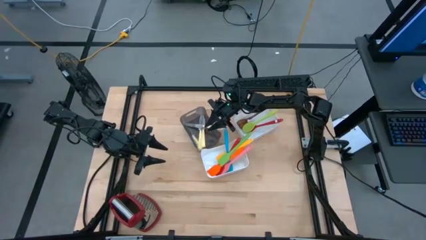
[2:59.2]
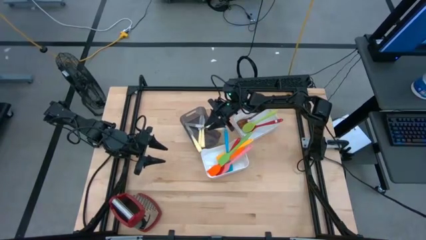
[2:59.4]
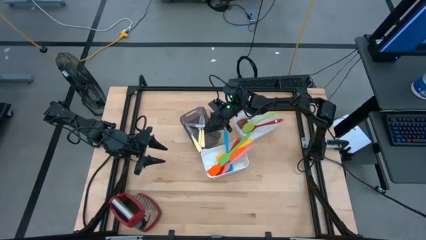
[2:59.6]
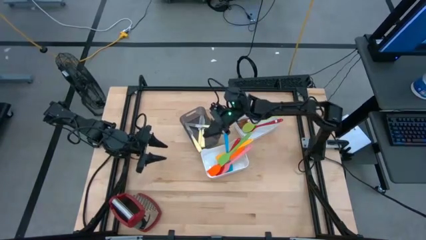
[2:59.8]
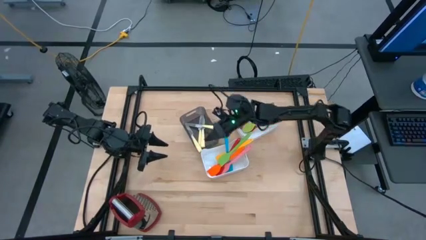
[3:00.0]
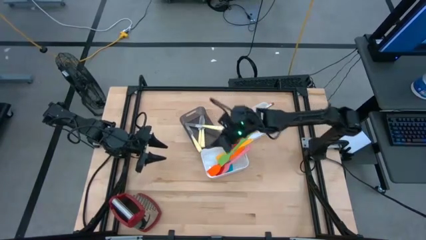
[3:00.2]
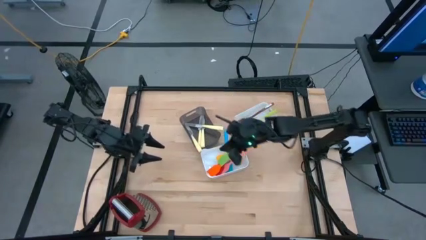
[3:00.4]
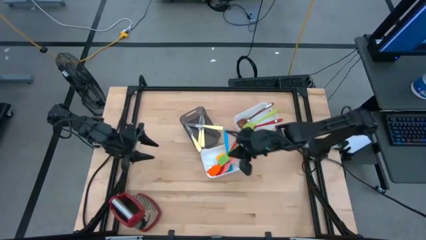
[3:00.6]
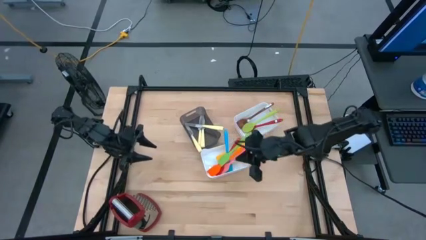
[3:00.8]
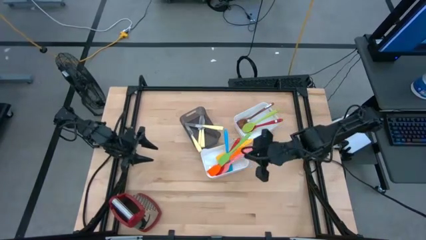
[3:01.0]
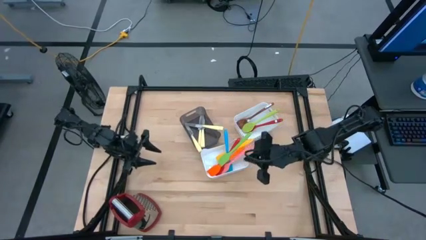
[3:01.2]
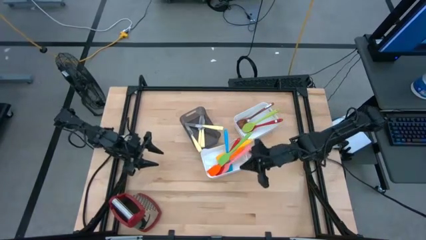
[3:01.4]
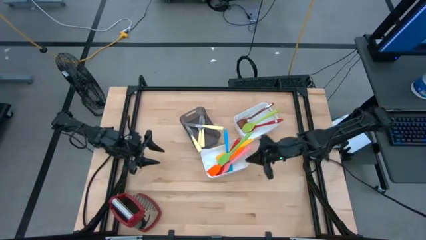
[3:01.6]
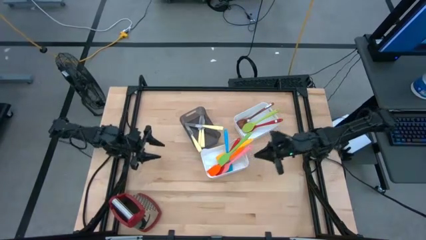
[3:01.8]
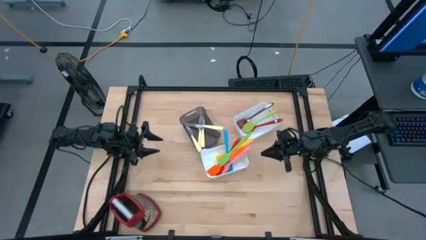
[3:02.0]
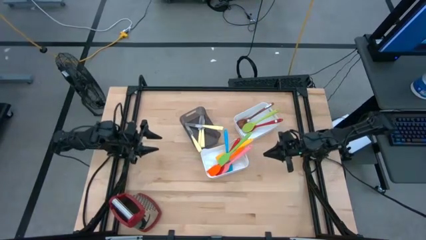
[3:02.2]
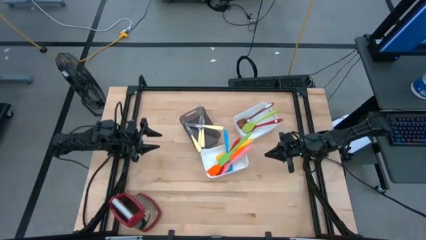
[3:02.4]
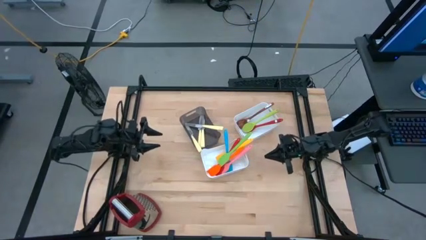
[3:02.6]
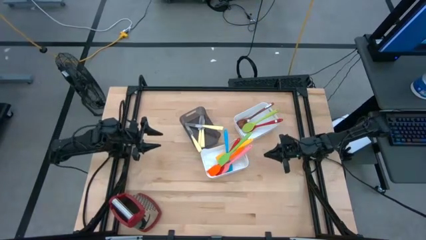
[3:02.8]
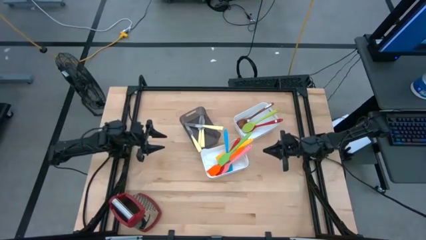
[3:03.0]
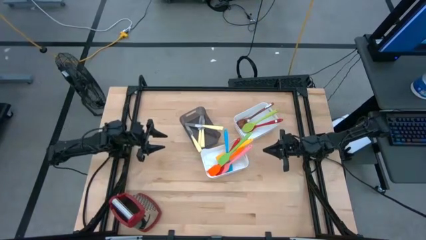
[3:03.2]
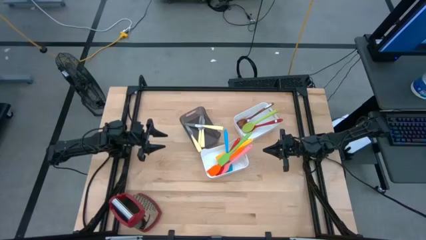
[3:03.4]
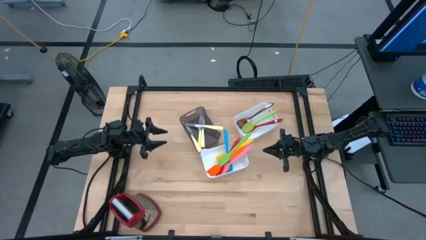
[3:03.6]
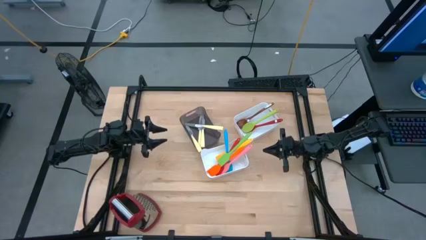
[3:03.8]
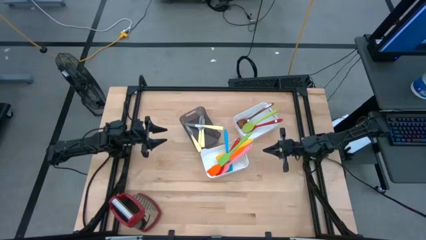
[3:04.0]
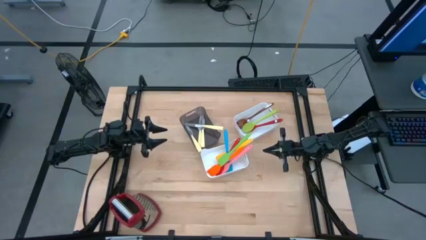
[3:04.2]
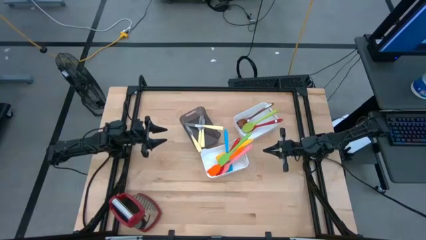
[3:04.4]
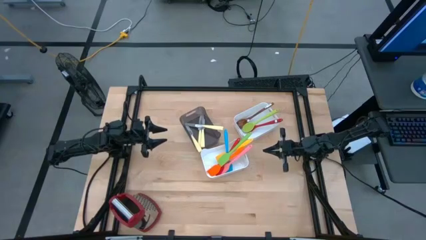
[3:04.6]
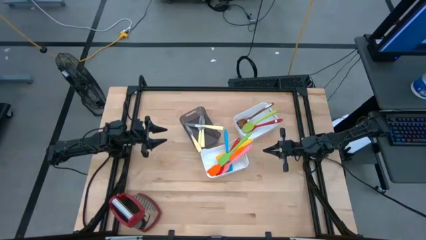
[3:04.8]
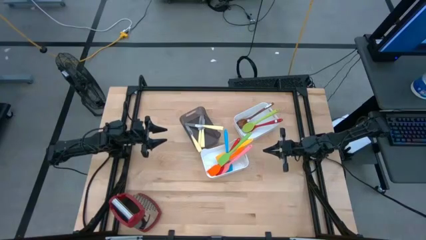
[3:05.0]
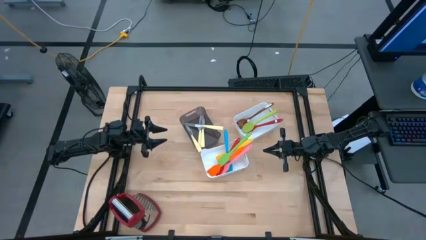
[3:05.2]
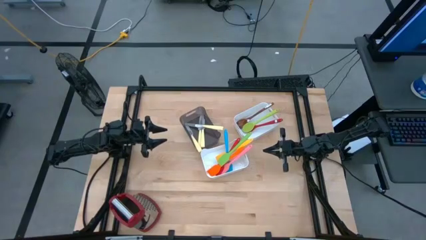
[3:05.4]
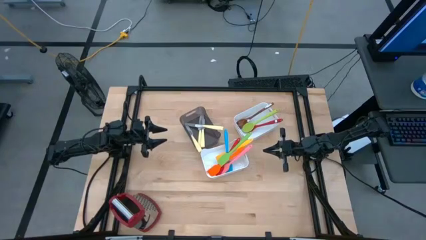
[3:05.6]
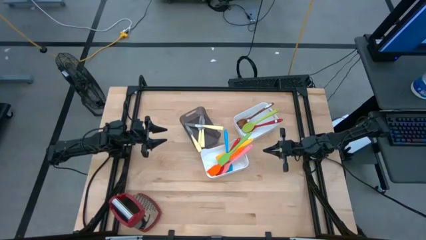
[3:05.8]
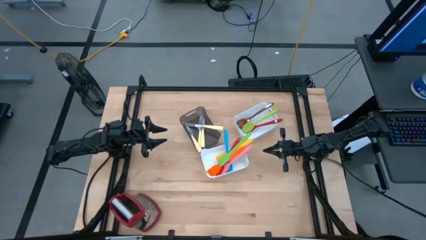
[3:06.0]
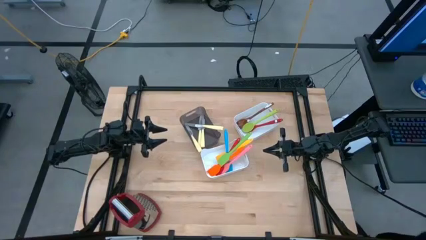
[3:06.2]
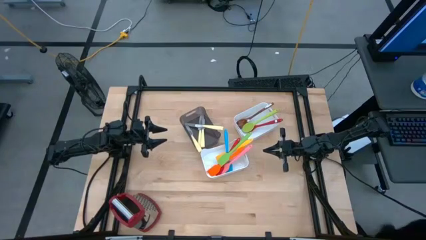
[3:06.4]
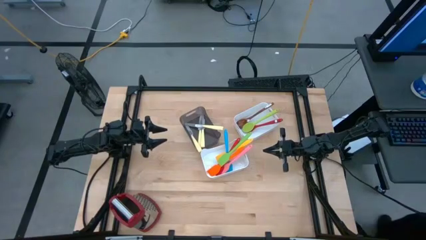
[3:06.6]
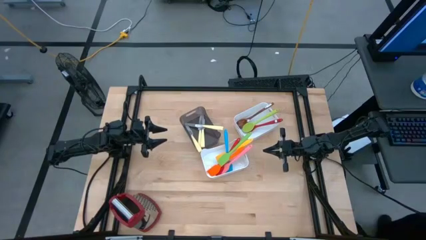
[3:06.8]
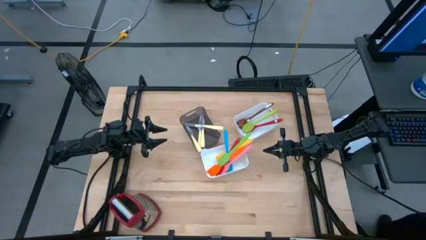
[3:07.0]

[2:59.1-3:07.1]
Task: Pick & Place Kitchen Items
Return to Home Position

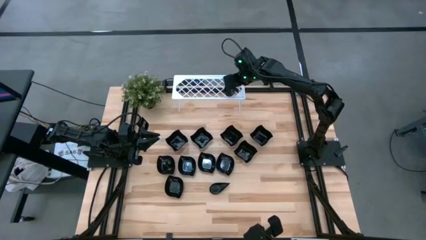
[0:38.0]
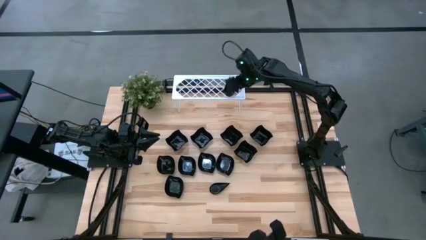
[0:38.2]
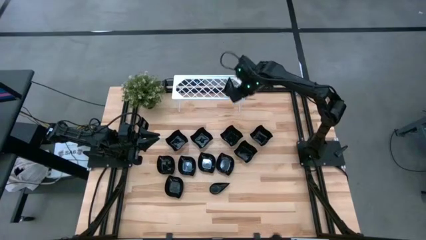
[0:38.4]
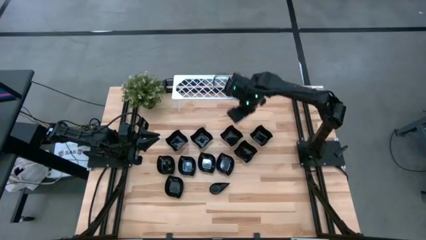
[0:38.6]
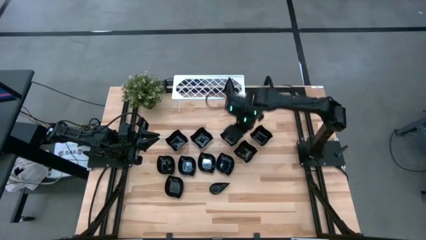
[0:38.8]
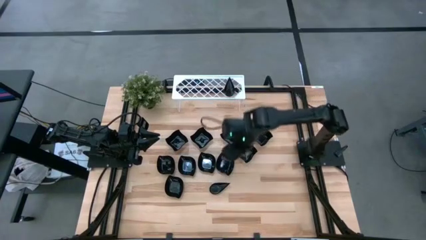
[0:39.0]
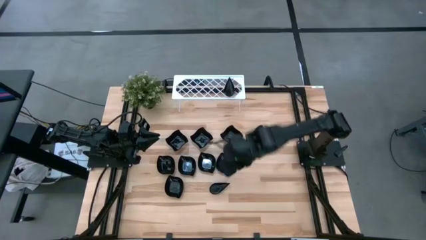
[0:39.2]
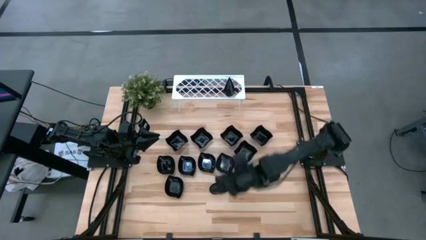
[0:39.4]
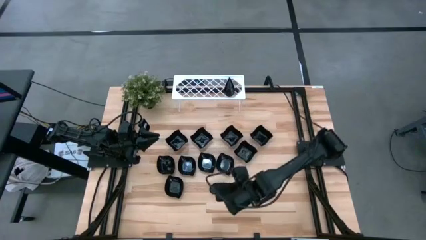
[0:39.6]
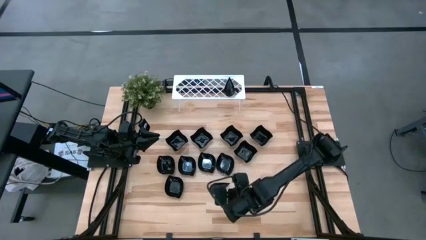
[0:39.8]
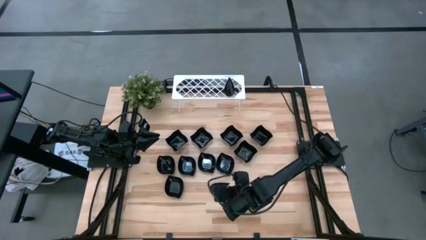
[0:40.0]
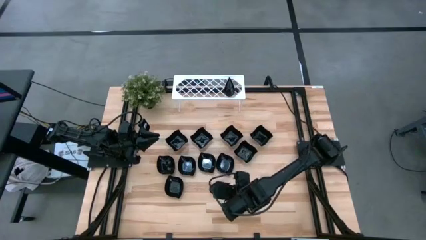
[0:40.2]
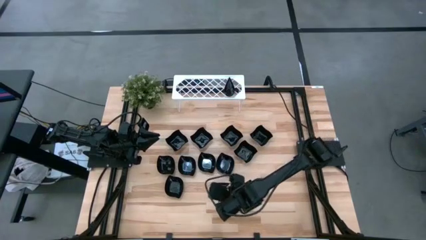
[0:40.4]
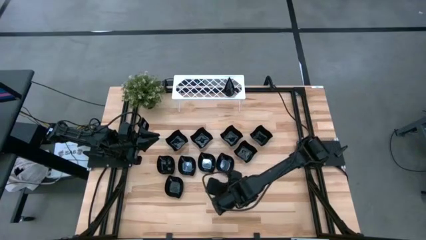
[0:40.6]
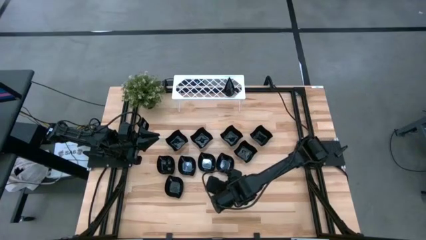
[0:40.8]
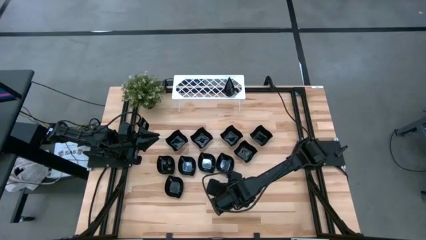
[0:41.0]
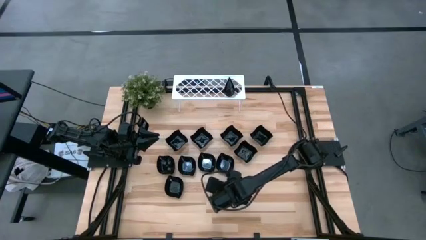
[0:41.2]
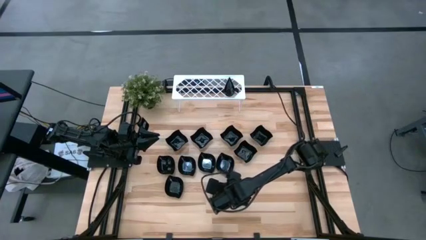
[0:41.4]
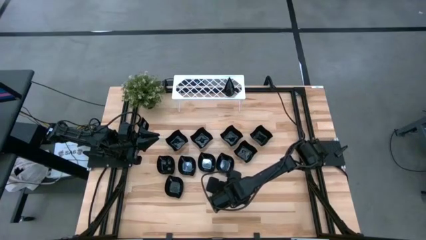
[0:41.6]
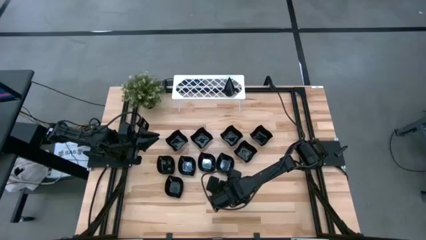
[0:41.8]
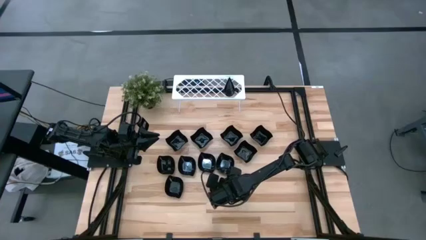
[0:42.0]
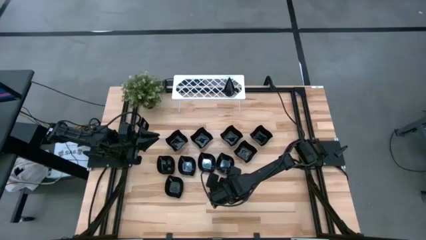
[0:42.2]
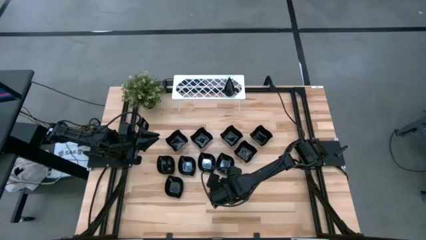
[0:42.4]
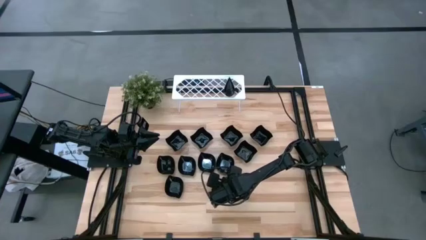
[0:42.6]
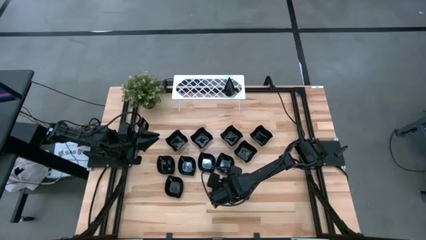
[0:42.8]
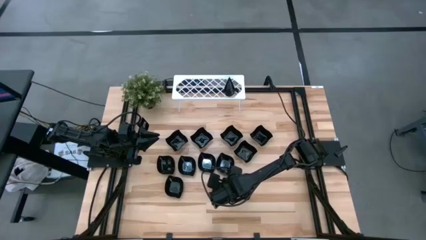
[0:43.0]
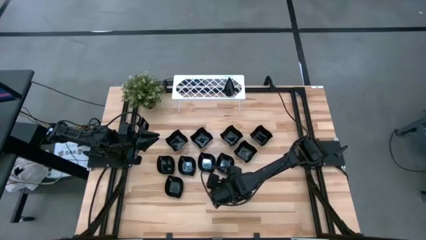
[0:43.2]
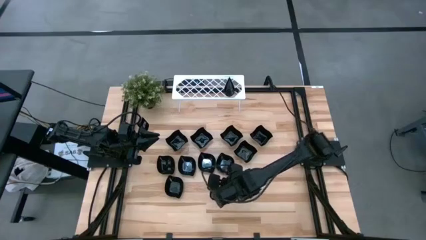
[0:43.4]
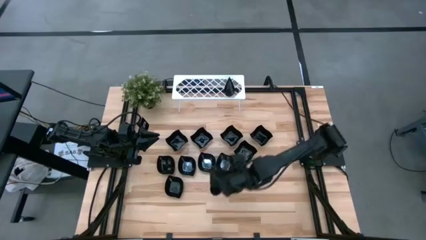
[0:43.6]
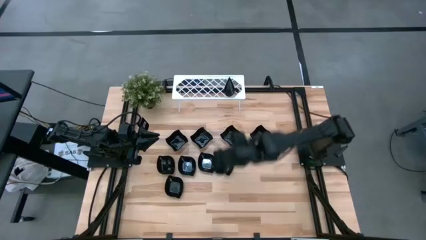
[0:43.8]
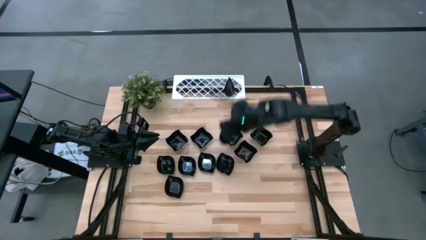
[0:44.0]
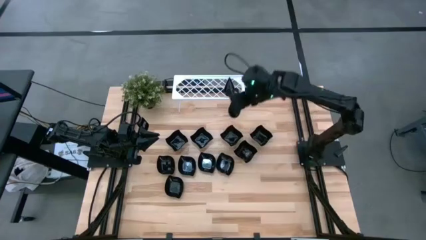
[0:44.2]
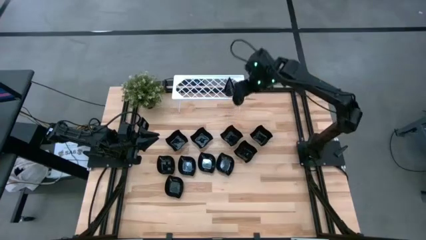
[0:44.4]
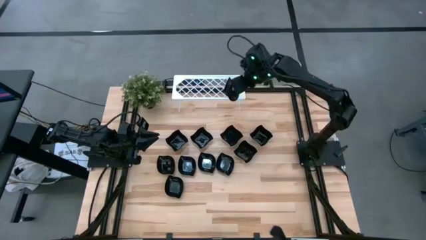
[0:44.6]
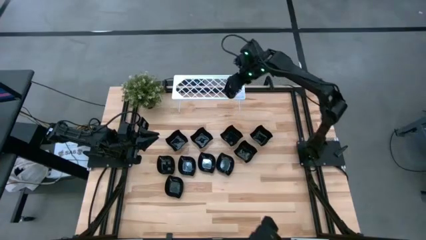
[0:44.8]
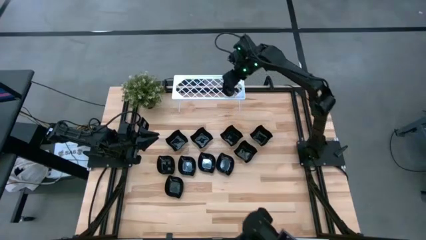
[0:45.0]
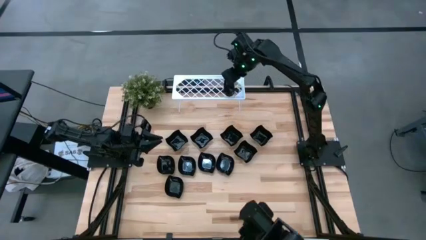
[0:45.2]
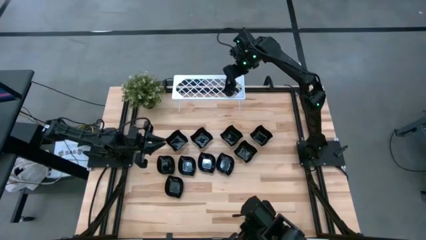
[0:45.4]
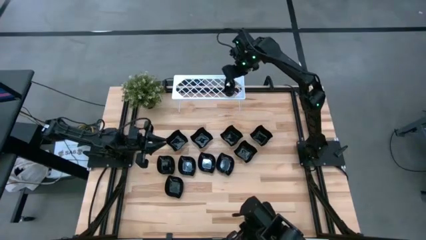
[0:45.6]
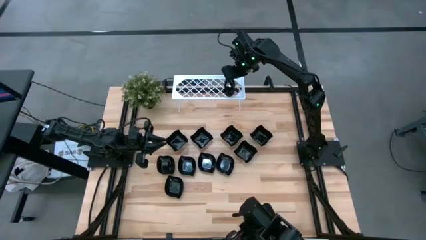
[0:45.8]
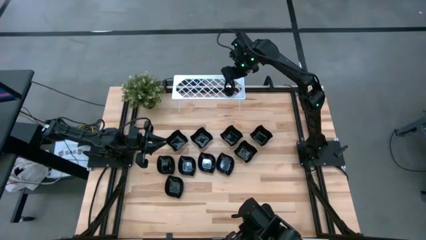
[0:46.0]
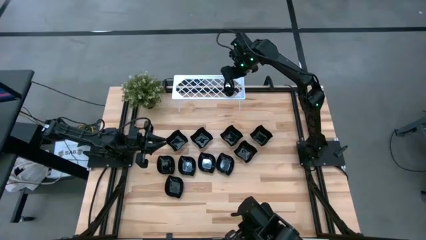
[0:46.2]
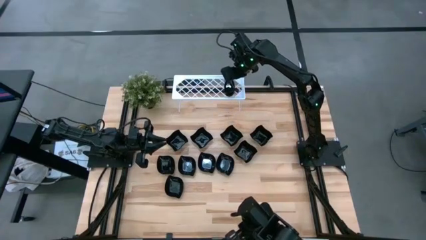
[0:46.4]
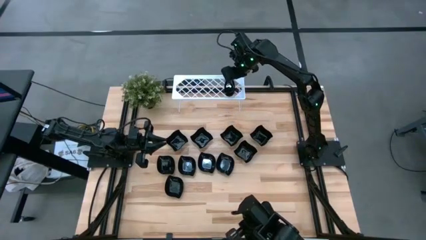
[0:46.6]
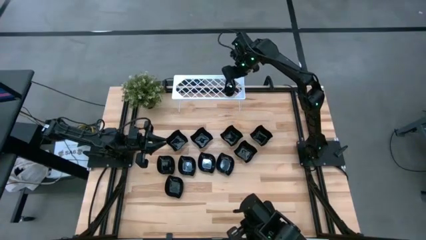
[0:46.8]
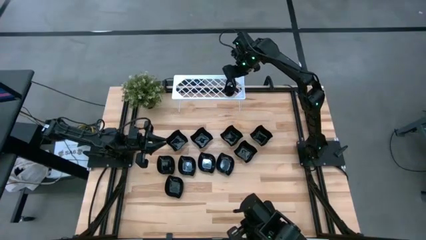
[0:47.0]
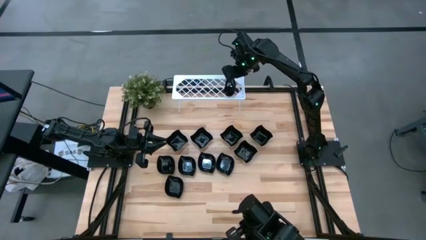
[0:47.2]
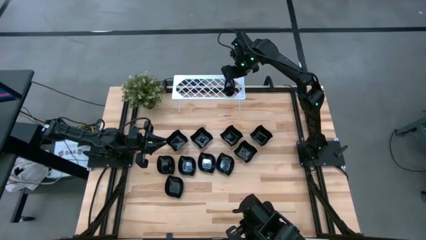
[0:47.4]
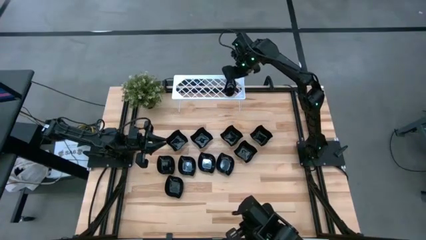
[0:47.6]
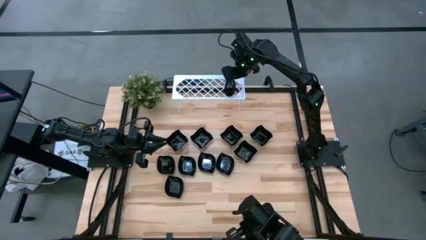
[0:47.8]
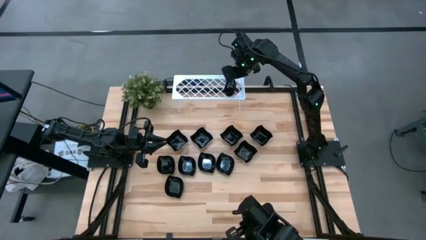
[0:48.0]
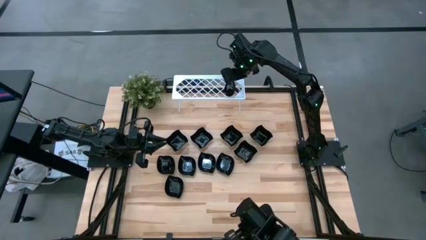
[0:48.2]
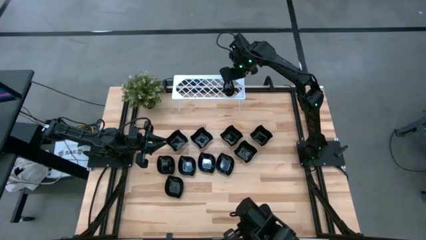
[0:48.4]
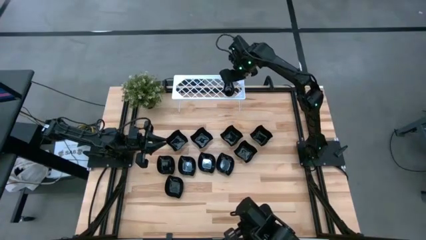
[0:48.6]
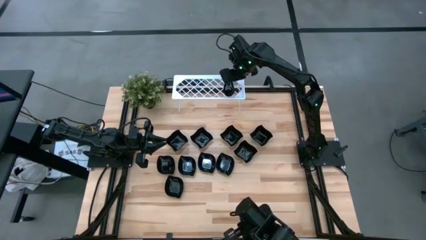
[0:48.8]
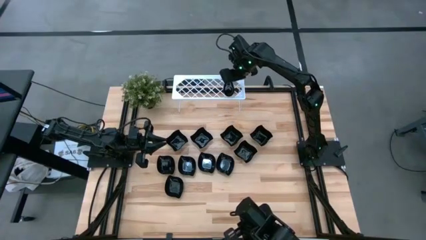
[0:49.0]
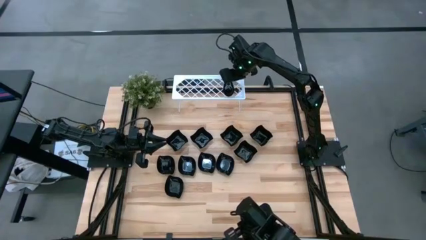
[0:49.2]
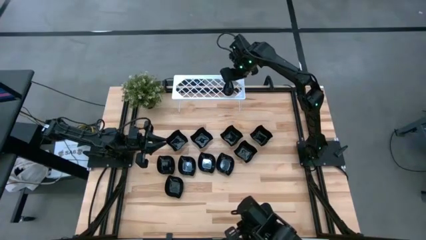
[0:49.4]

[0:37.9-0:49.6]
Task: Pick & Place Mini shaped plates
Stack the drop-shaped plate on top of the drop-shaped plate on the shelf
